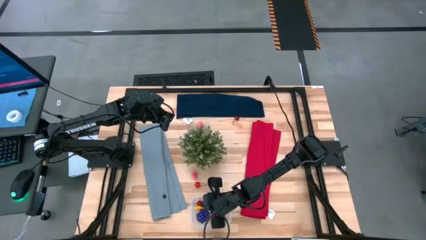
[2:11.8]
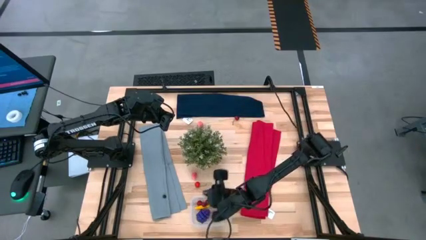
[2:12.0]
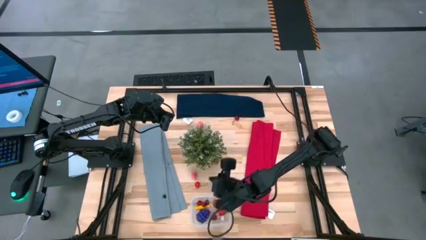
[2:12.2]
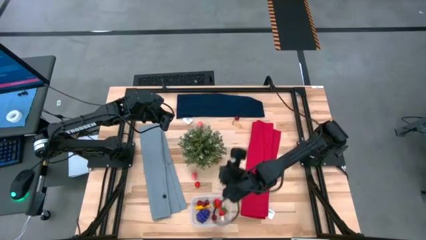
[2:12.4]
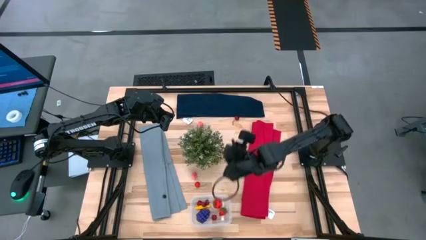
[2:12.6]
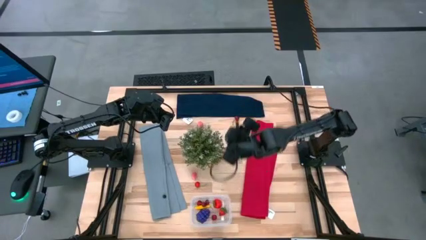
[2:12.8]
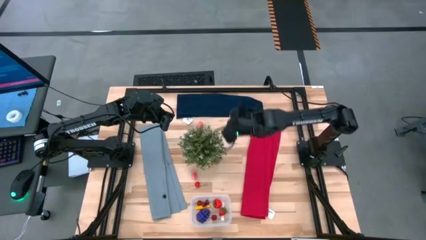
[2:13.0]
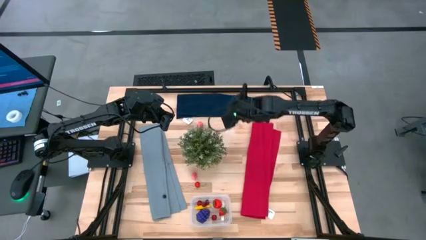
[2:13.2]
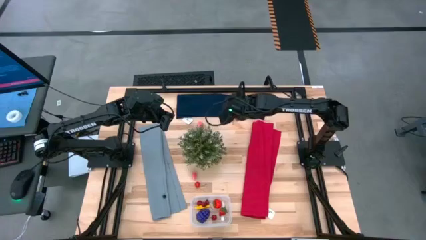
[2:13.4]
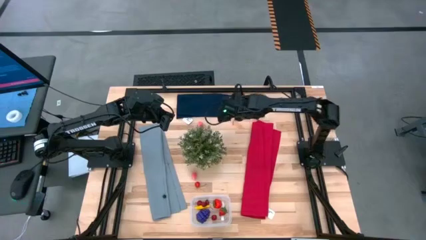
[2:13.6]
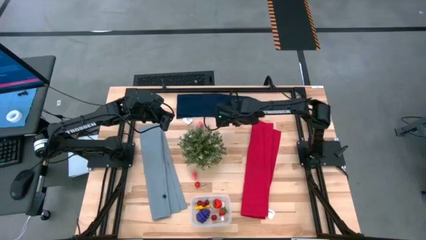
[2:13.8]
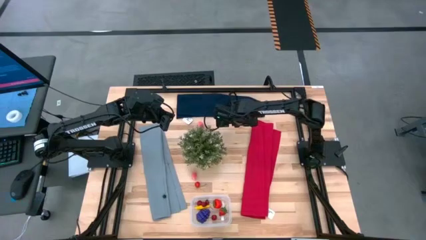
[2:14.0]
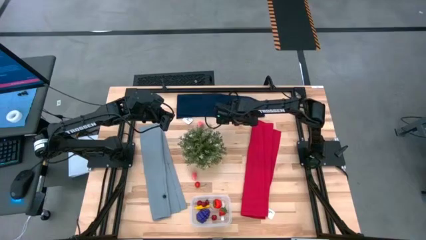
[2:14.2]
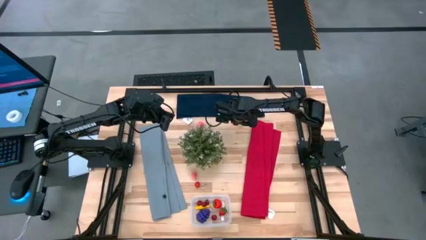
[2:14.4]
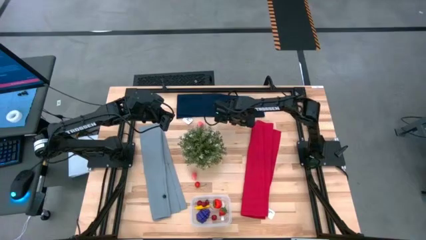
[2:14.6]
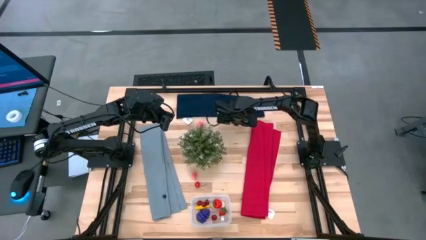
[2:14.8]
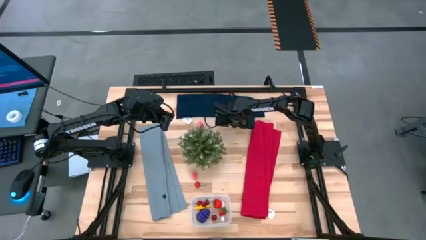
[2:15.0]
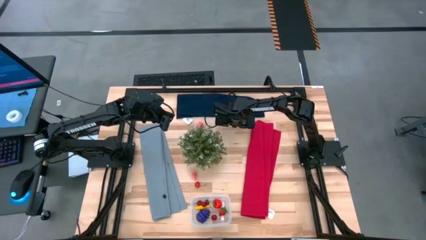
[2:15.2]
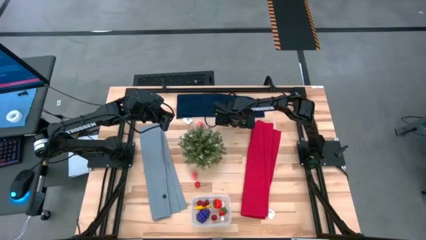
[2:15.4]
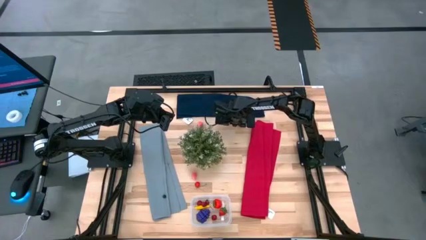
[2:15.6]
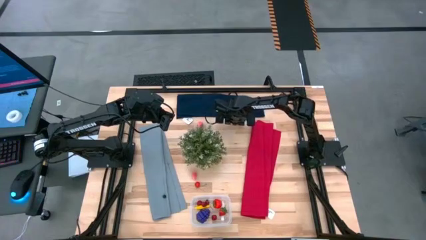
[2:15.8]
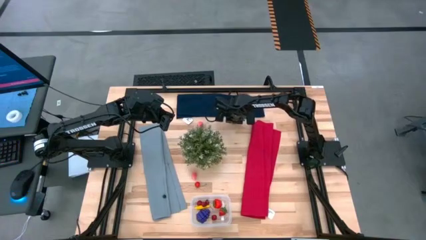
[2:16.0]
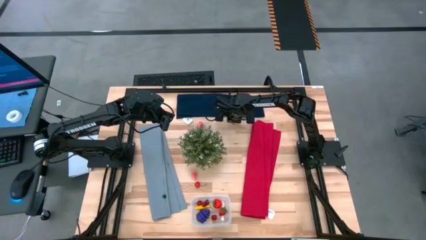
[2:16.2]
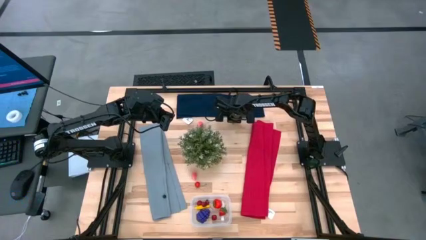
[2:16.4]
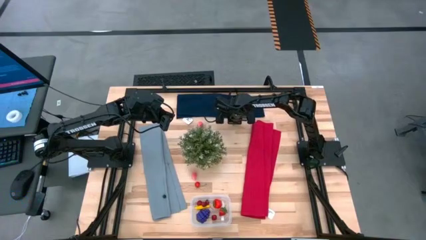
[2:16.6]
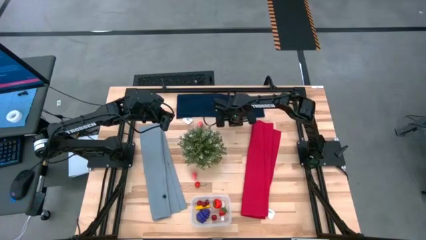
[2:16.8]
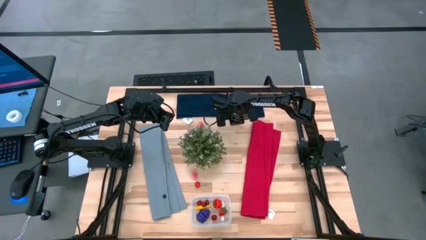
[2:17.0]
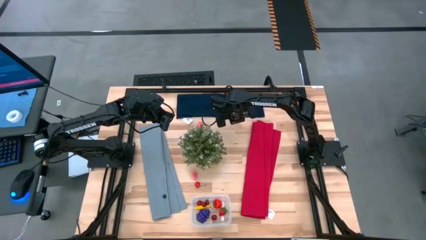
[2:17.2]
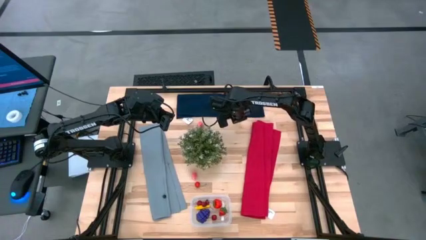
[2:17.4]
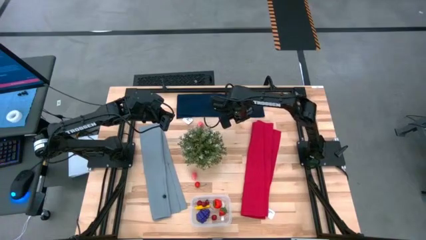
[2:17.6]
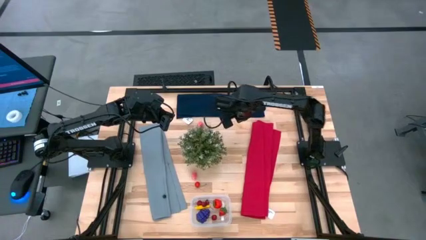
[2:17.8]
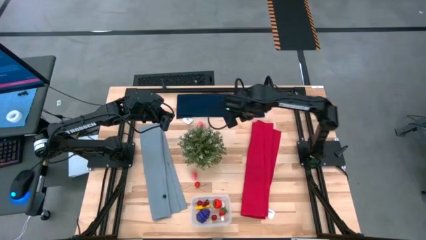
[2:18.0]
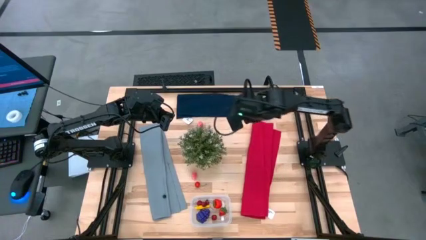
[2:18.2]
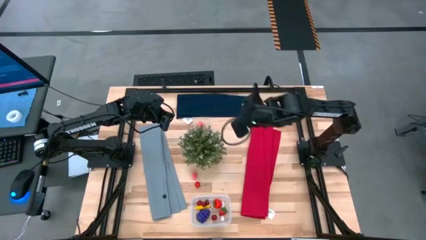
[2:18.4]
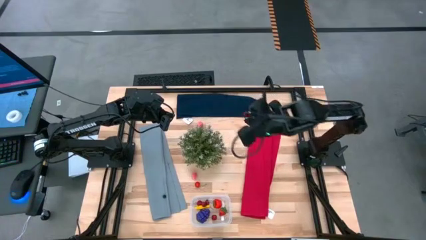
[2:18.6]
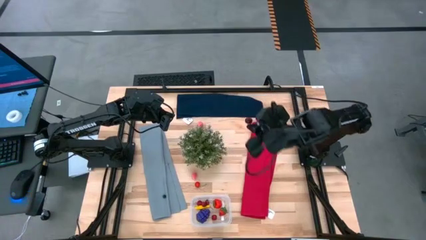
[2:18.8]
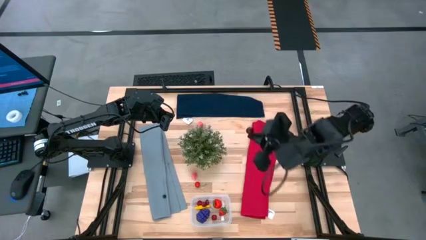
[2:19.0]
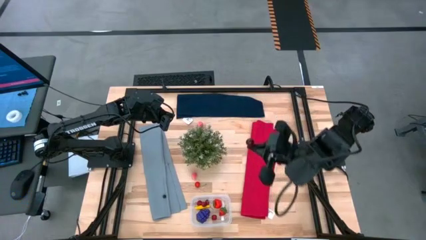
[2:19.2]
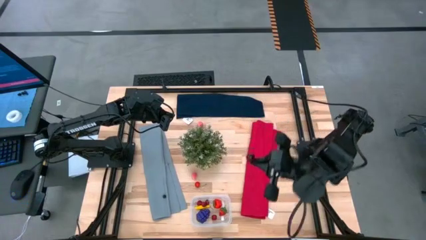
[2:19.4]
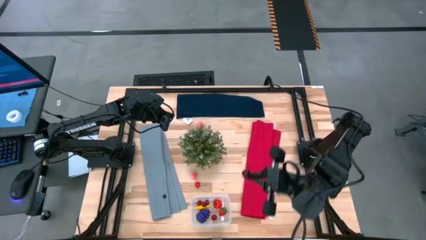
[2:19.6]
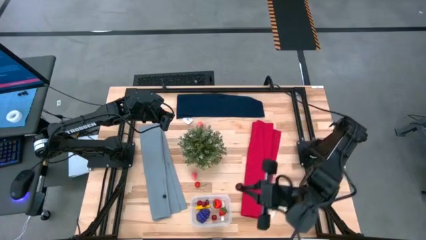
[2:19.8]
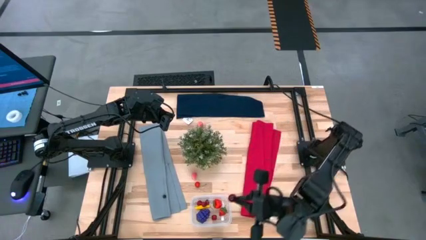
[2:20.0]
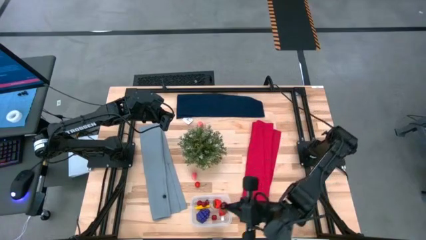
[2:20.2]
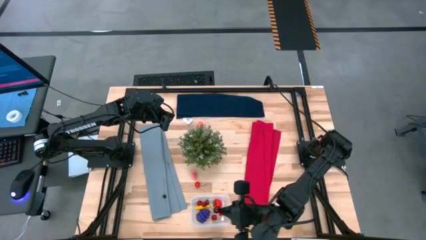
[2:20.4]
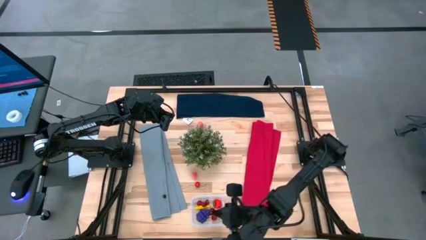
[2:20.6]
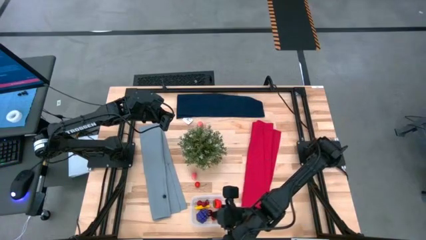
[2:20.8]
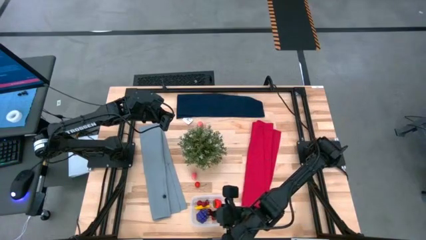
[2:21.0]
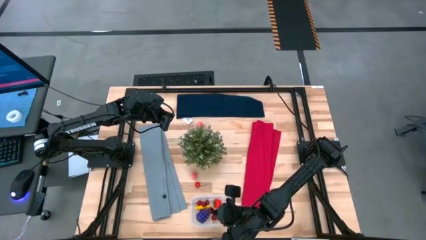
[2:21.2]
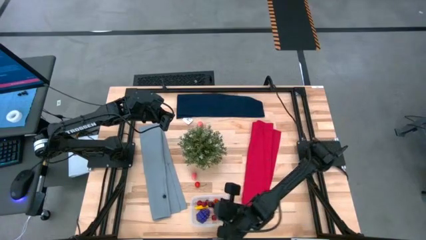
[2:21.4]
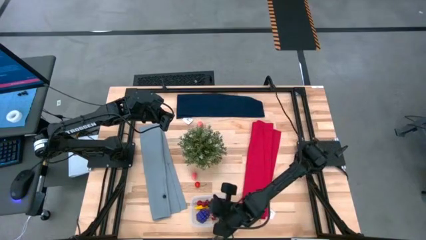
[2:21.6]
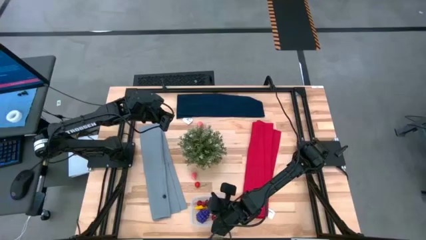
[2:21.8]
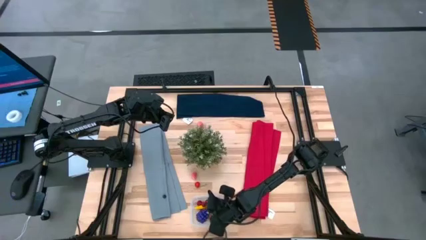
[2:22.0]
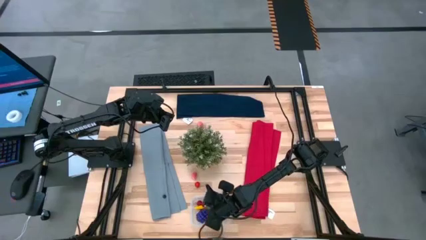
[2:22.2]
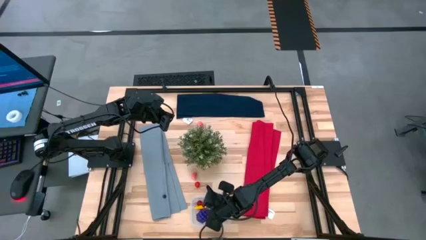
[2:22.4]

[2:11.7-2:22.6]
Task: Pick and placing Produce into tupperware
Put the top cherry into the transparent container
